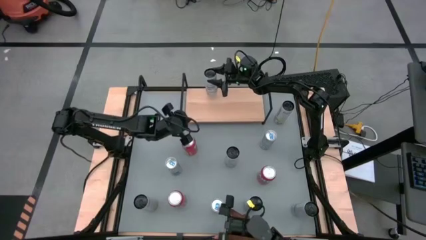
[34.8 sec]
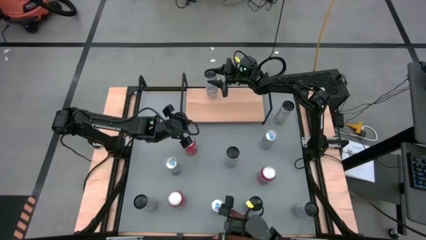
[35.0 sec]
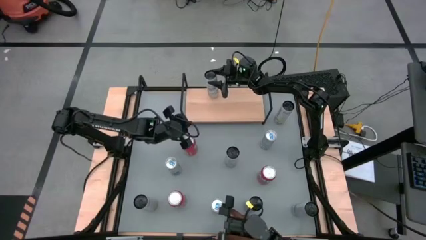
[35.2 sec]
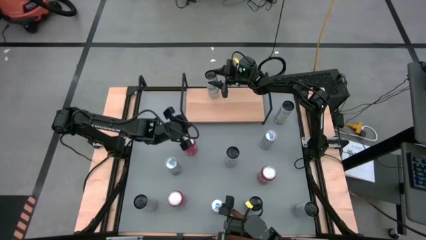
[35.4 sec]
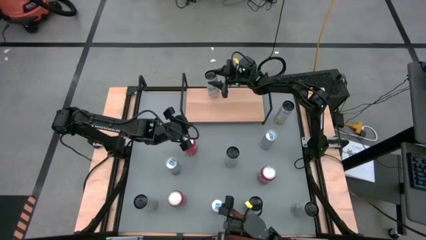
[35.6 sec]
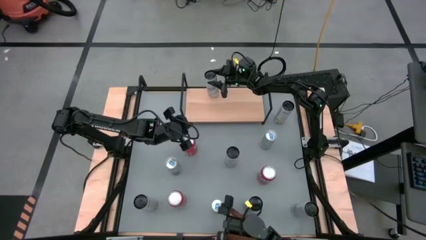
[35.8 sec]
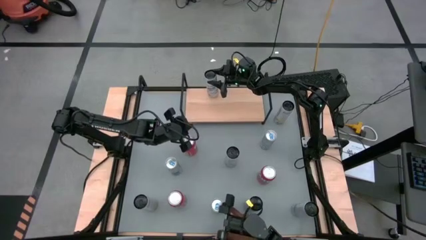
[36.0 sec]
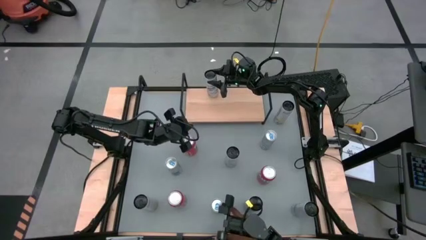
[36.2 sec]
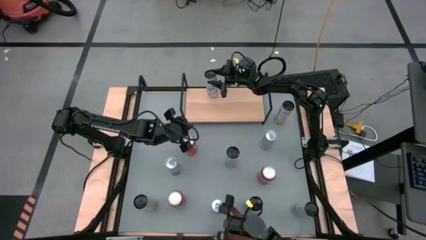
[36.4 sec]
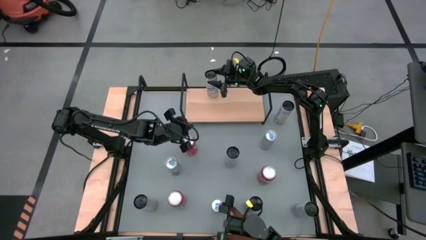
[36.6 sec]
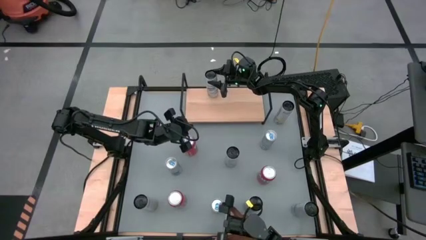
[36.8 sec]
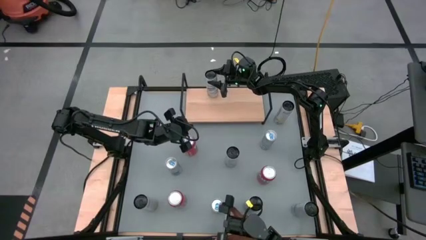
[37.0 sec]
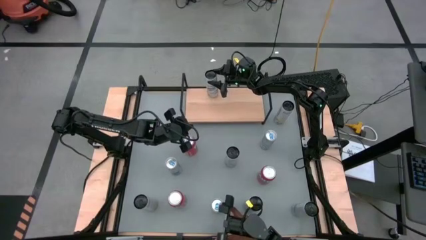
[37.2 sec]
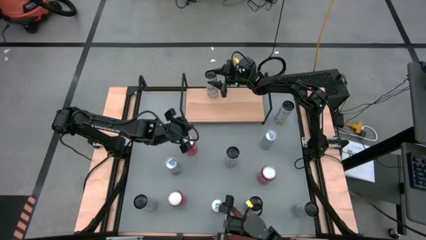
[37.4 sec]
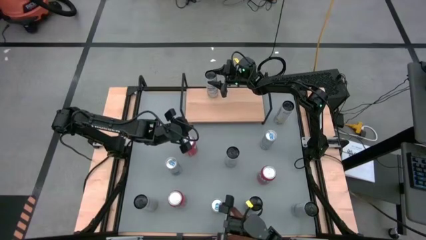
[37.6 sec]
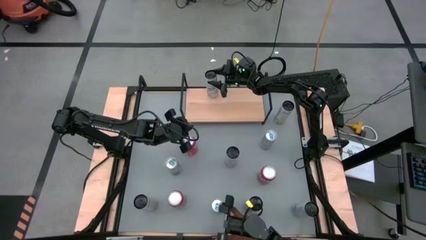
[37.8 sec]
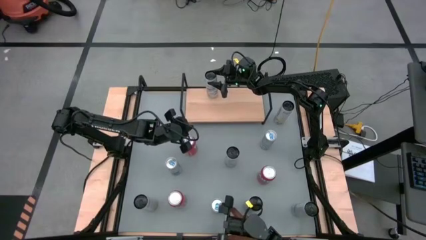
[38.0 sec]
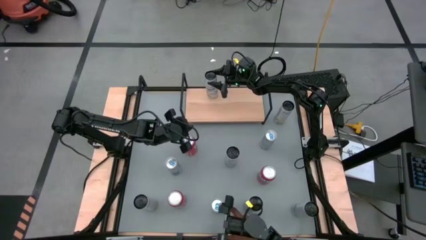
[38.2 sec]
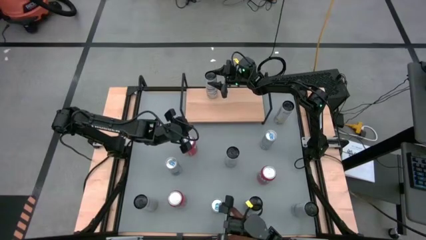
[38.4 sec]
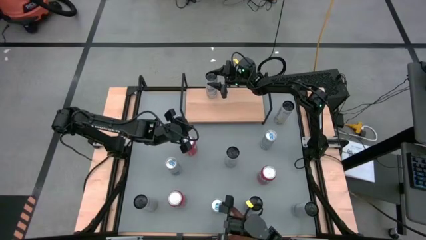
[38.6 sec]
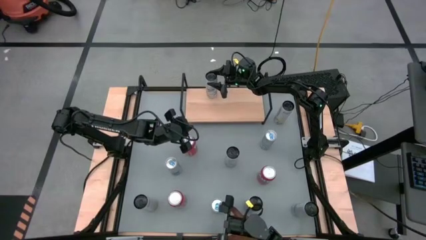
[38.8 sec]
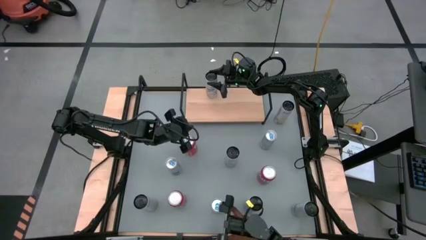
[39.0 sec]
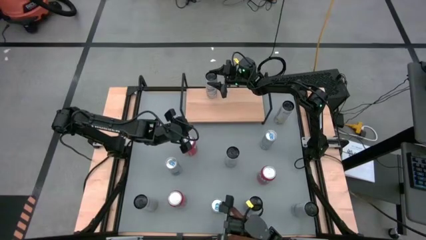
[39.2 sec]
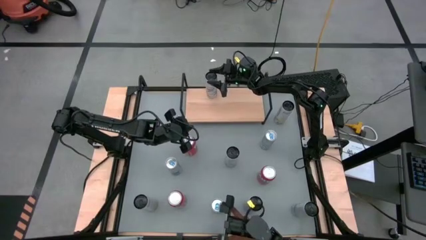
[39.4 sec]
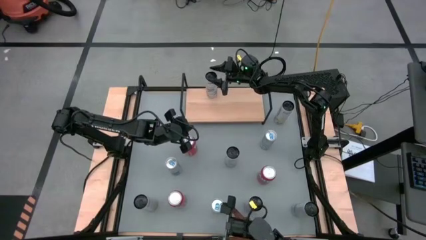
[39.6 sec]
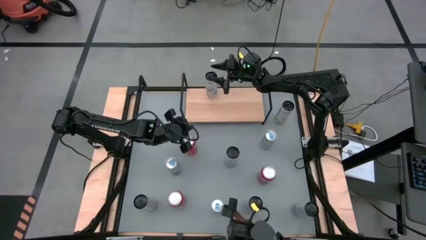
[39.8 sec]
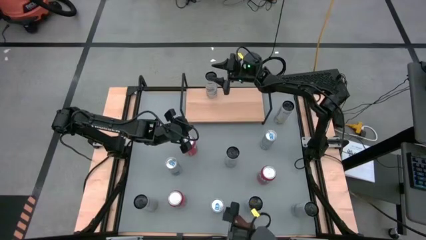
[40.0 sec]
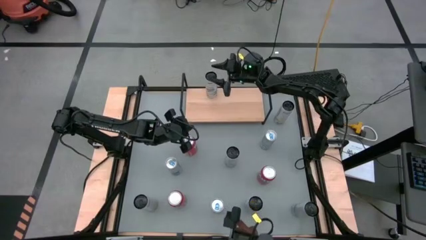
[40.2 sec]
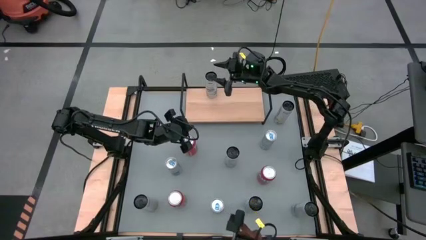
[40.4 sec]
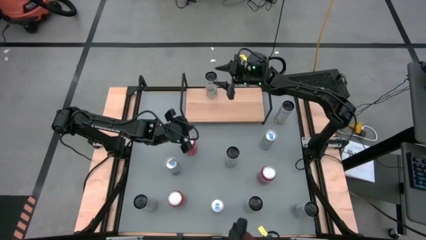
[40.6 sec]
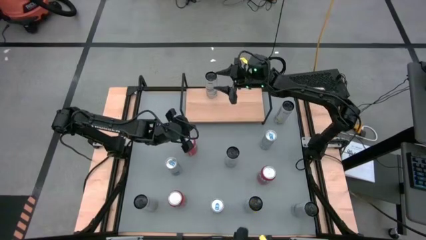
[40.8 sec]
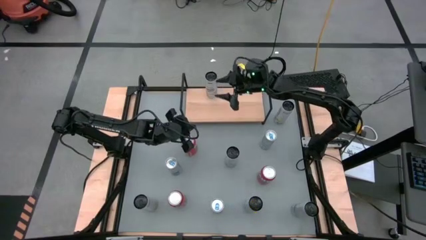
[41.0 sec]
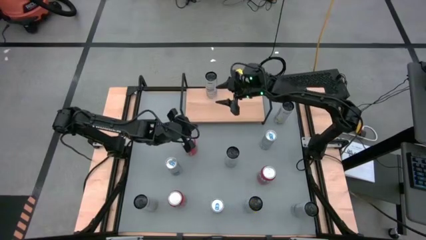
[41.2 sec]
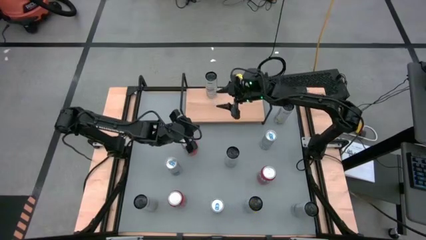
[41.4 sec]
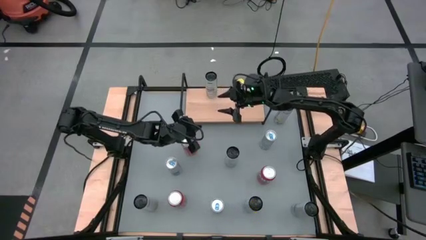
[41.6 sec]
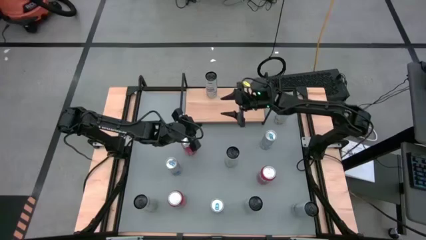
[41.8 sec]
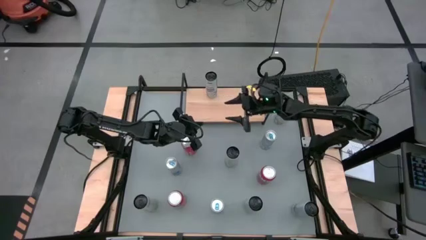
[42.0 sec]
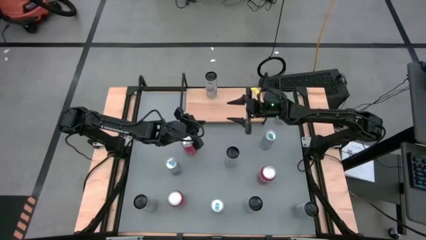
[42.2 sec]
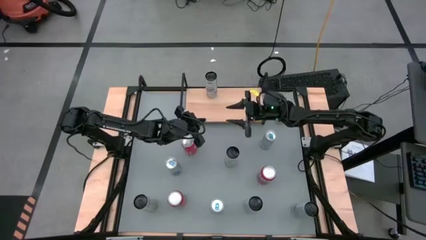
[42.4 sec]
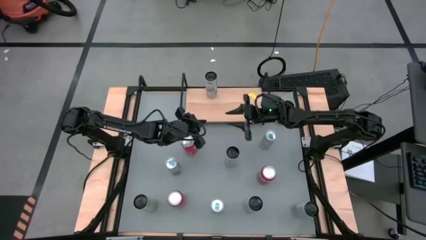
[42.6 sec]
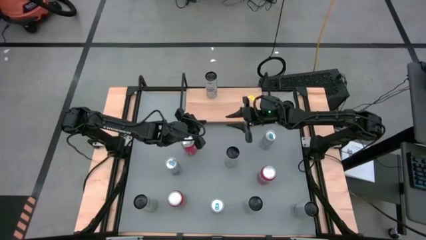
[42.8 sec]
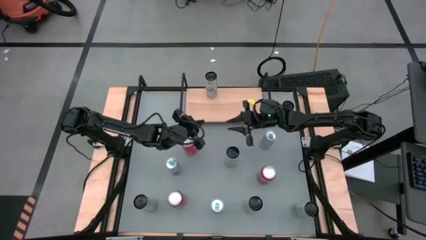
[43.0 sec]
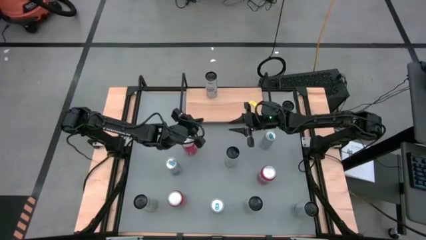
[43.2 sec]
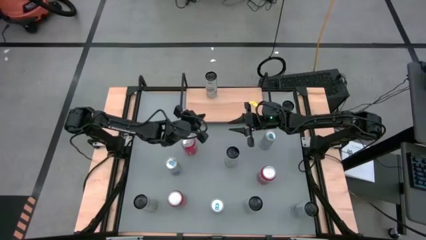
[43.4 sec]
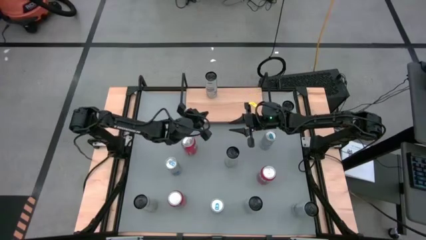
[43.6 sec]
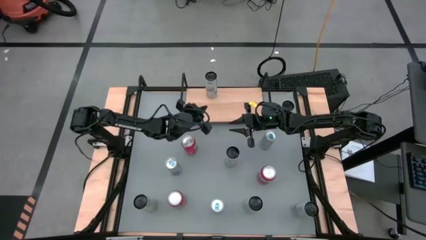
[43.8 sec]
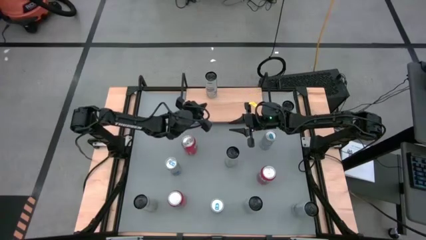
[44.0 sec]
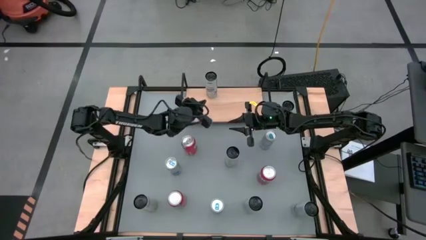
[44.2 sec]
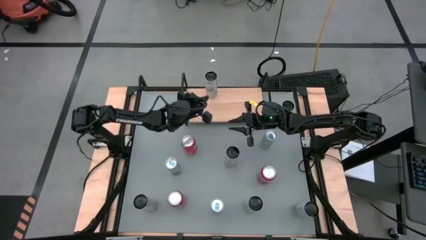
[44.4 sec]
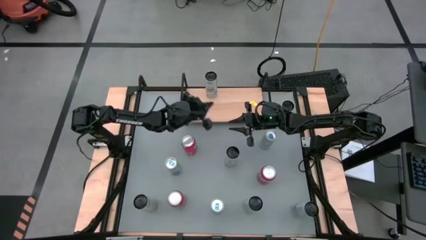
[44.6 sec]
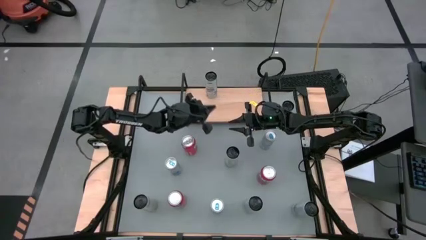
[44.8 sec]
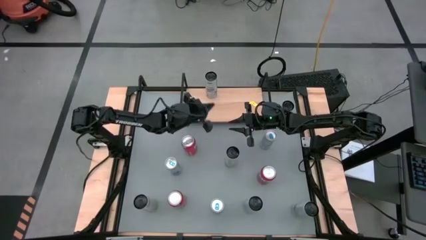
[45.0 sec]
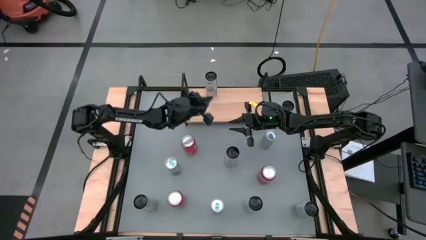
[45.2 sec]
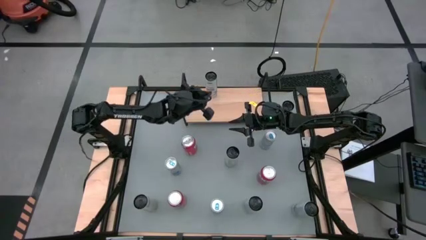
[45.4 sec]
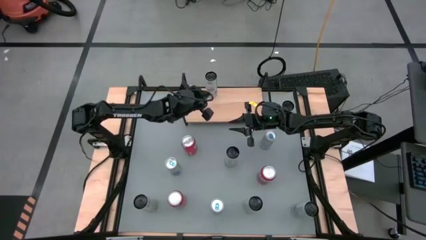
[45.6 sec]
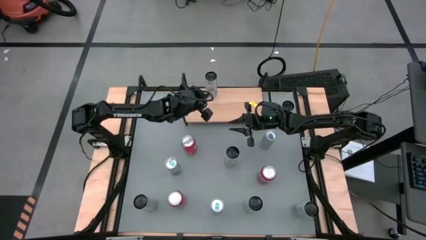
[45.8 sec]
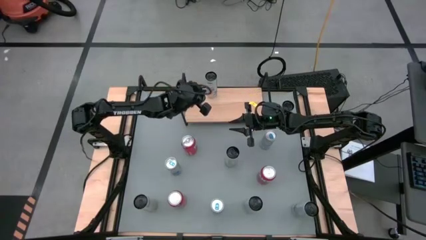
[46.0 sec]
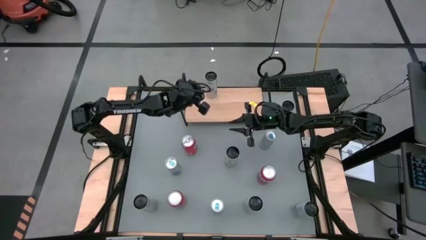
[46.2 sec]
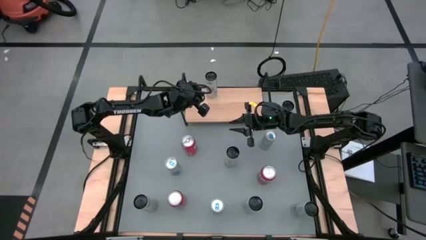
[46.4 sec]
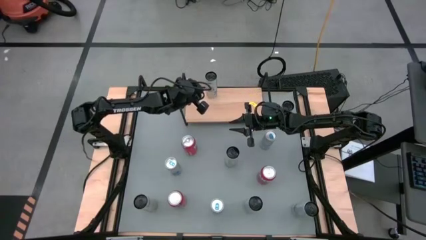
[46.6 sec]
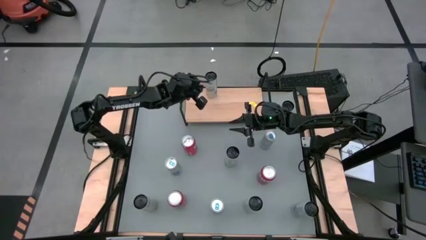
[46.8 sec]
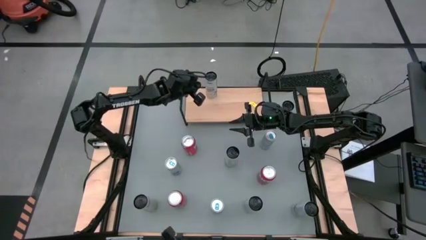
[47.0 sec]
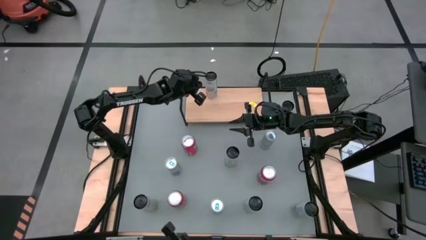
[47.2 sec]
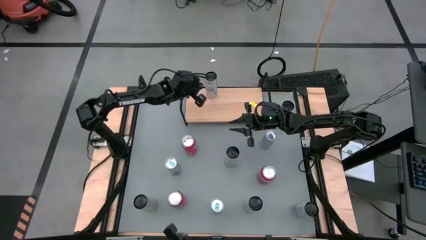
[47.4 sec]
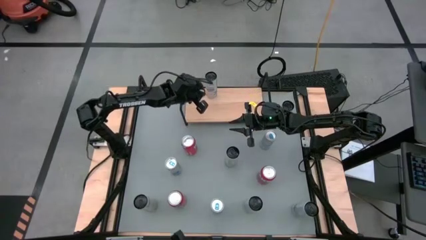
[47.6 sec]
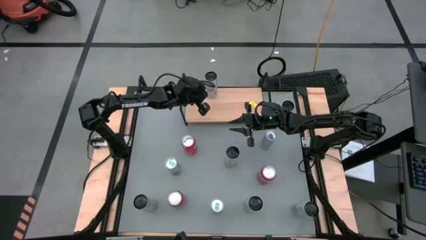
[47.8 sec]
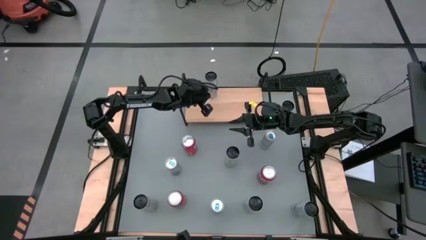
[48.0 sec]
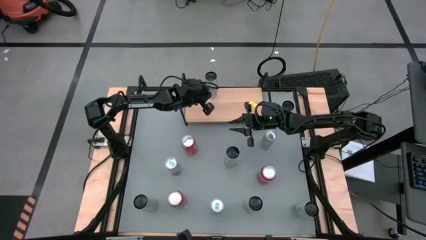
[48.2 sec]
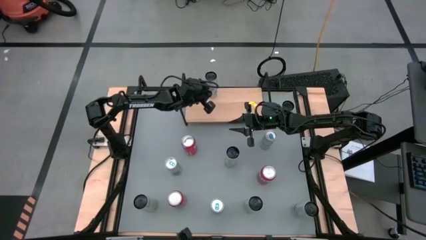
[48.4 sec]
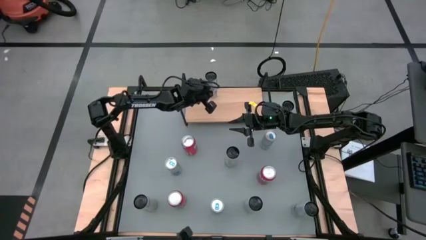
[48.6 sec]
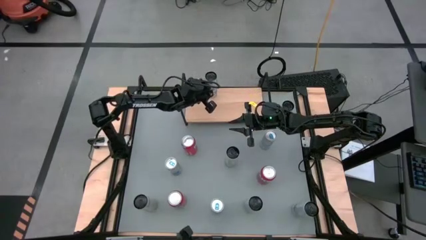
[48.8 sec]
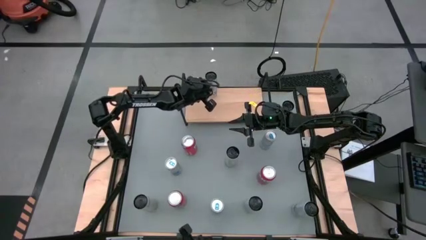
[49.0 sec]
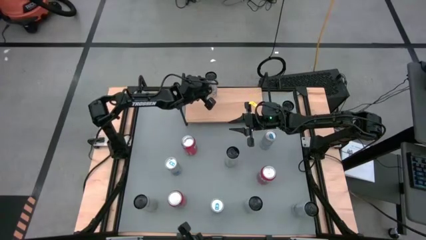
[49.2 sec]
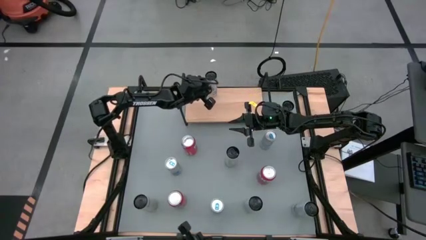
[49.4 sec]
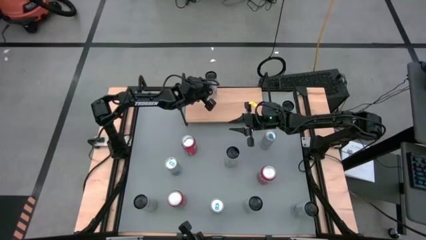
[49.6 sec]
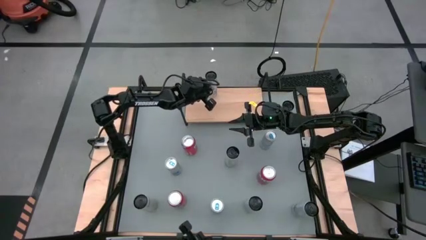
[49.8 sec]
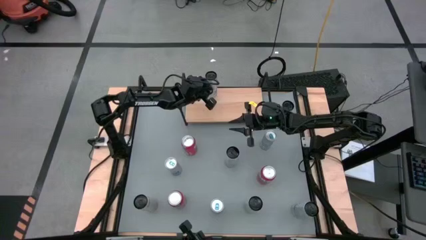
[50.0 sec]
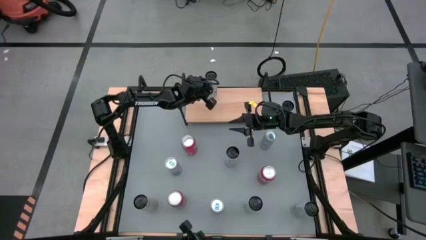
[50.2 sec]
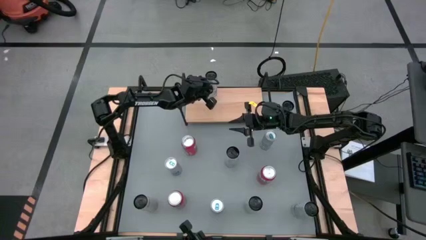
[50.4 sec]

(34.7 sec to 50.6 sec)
Task: Place canned beverage on shelf
Put the top left white blue soda can on the shelf
